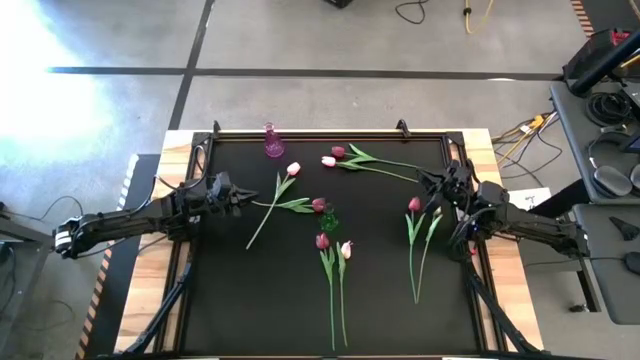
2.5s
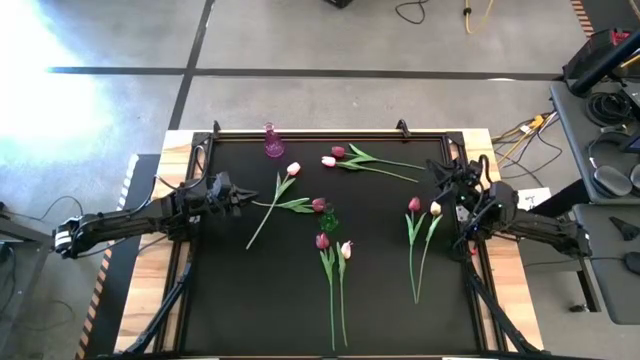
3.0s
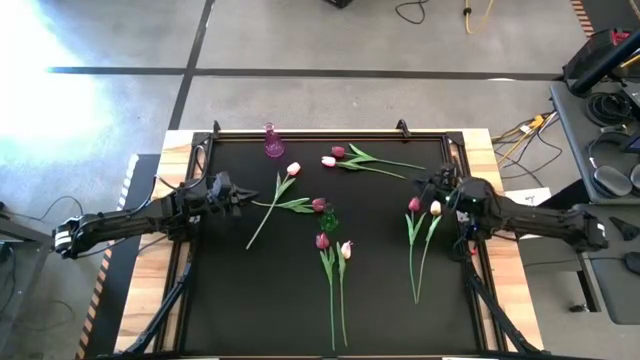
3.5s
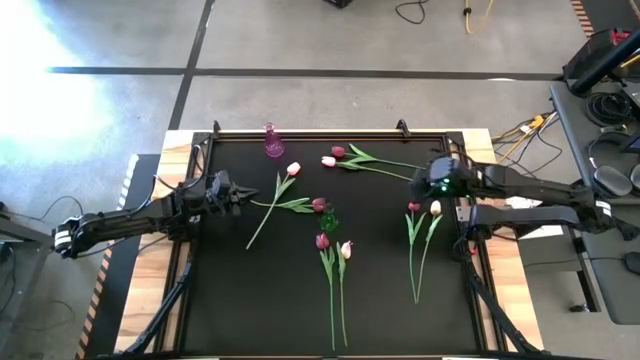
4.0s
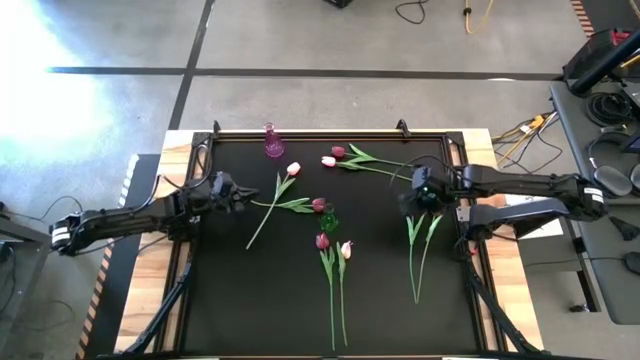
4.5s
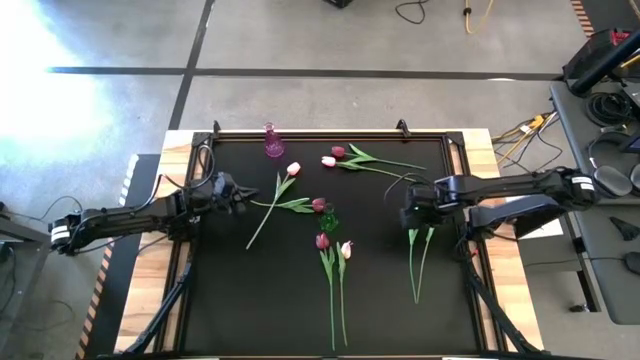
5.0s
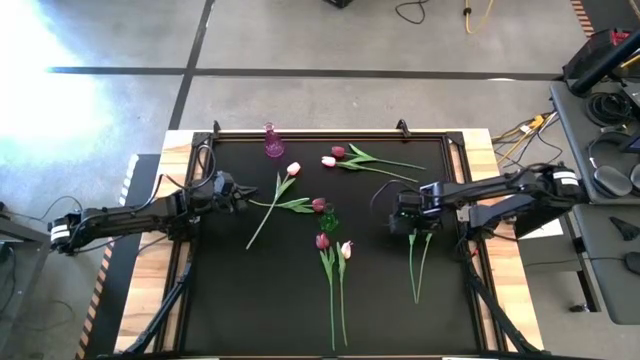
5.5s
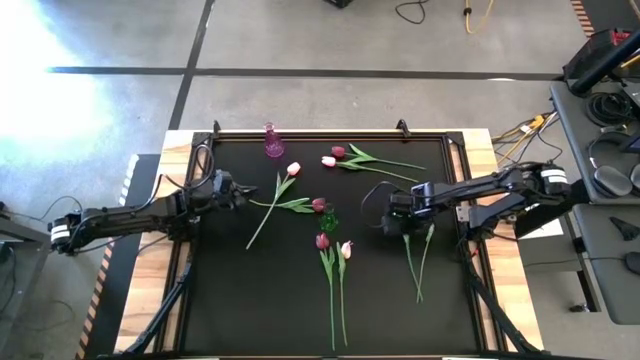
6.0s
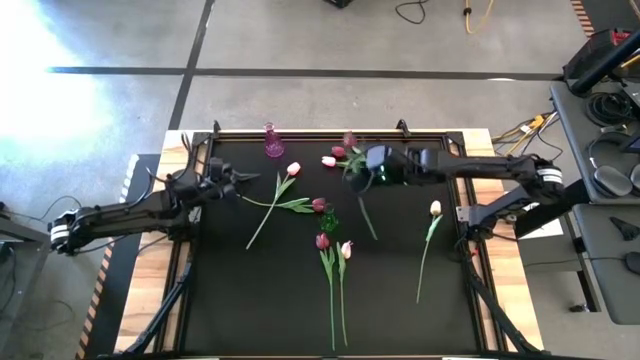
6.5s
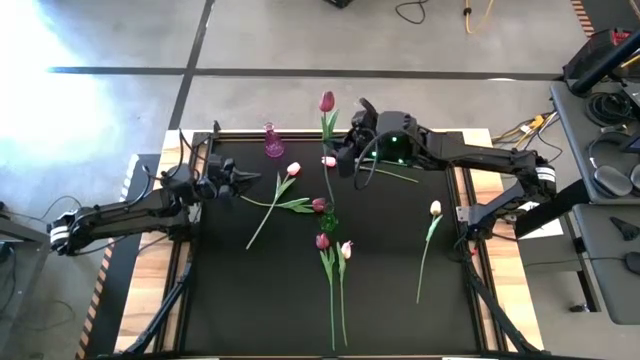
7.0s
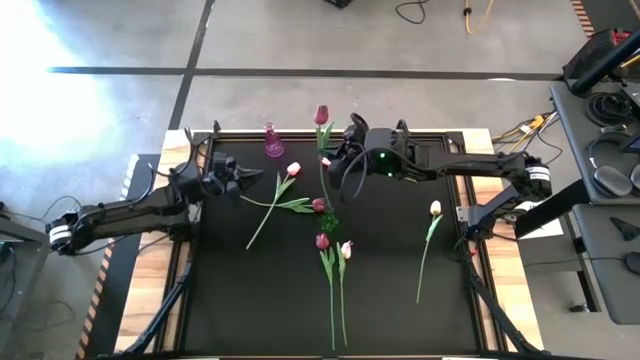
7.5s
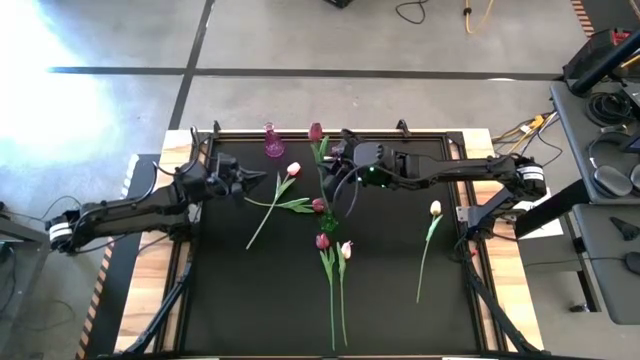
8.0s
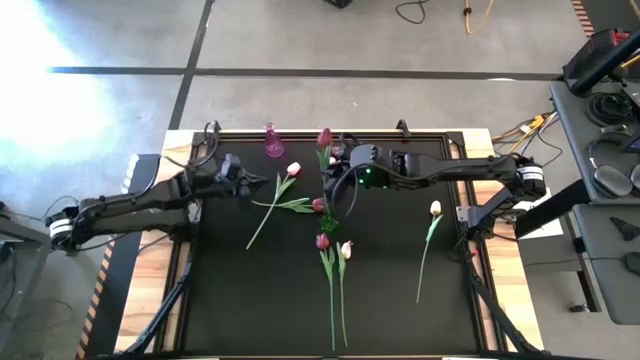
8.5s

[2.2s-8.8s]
Task: Sort flowers into vase by color
Put the red flower into the green vase

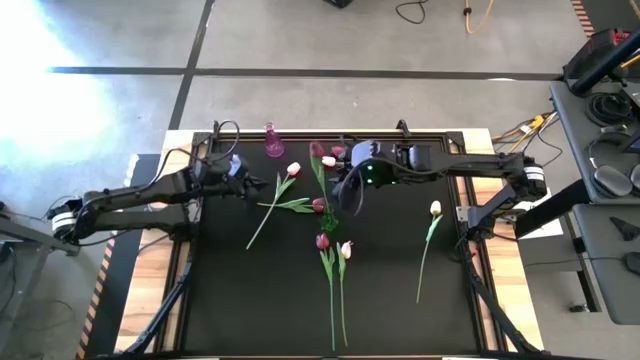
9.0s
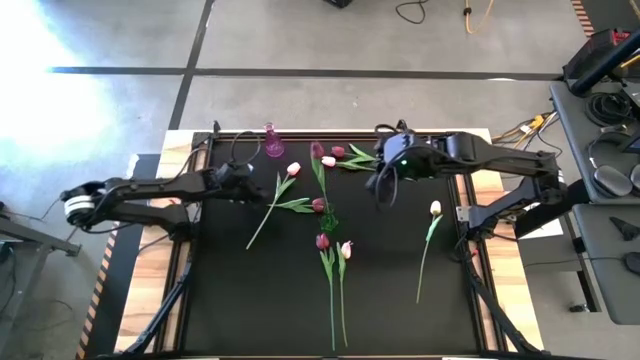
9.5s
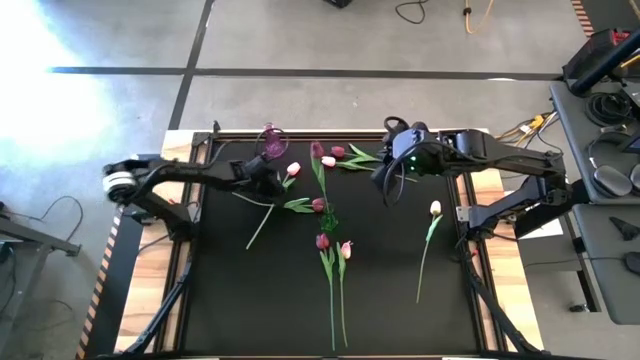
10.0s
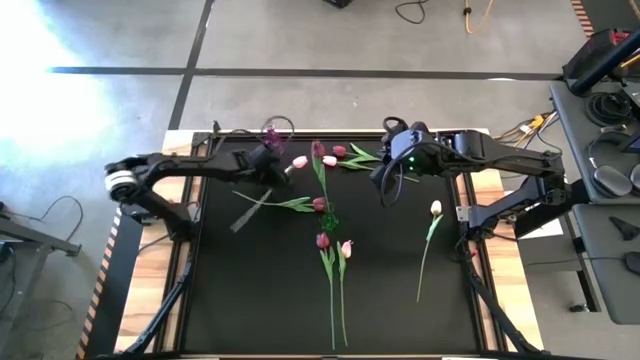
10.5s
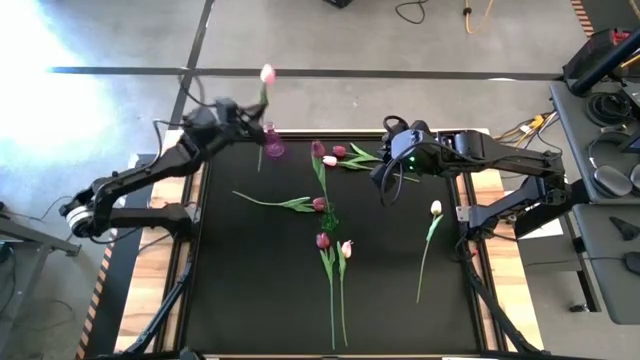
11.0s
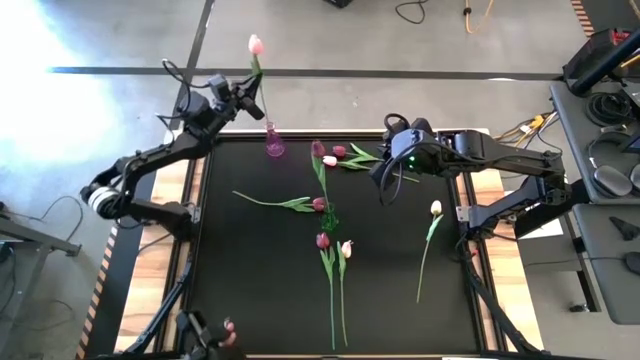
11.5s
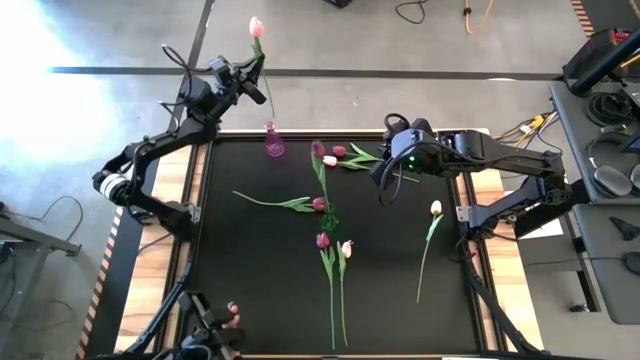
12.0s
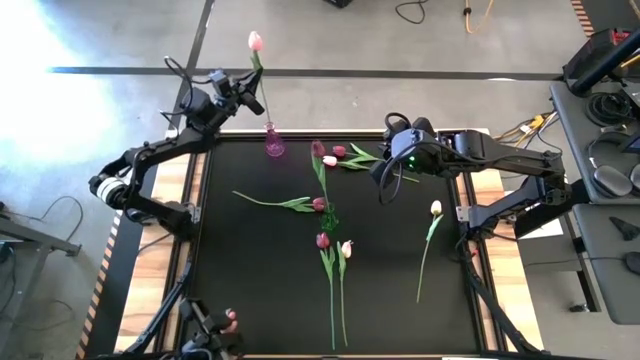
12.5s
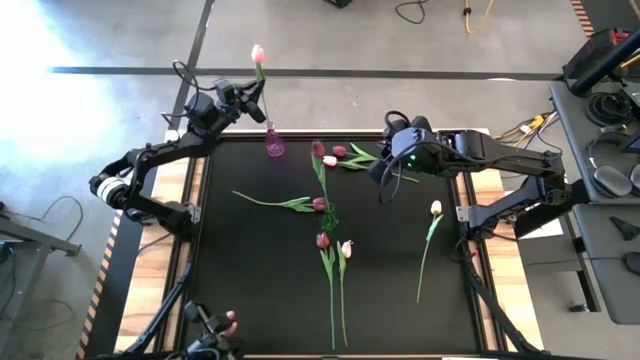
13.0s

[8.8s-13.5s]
Put the pink flower into the violet vase

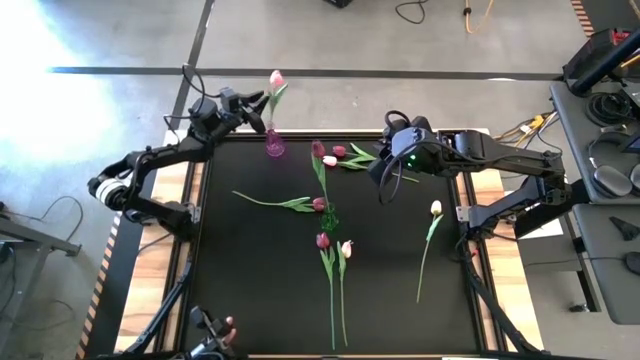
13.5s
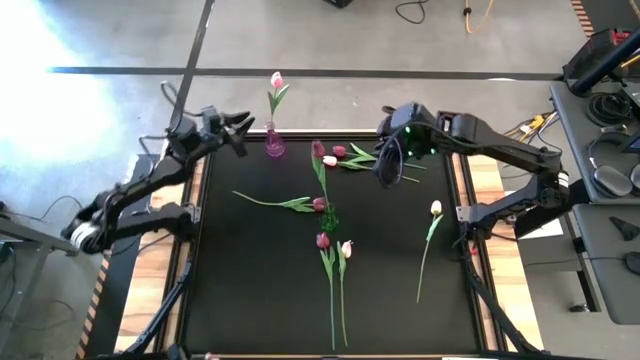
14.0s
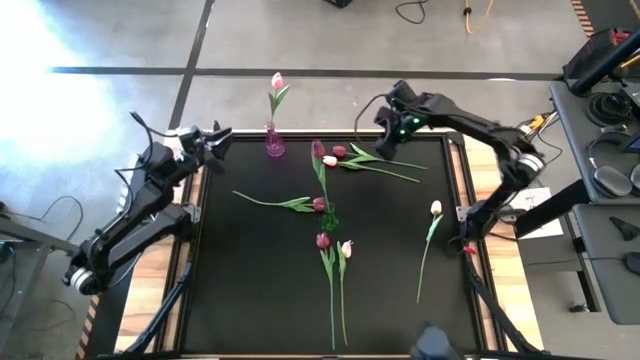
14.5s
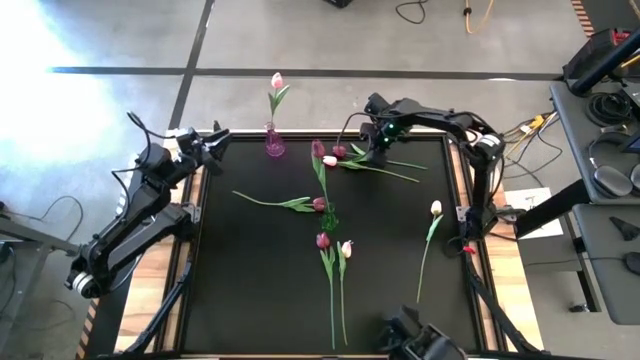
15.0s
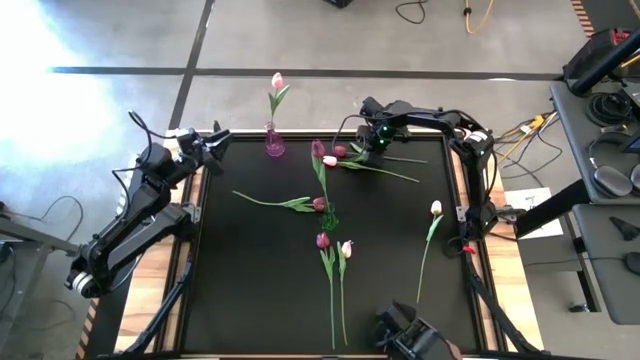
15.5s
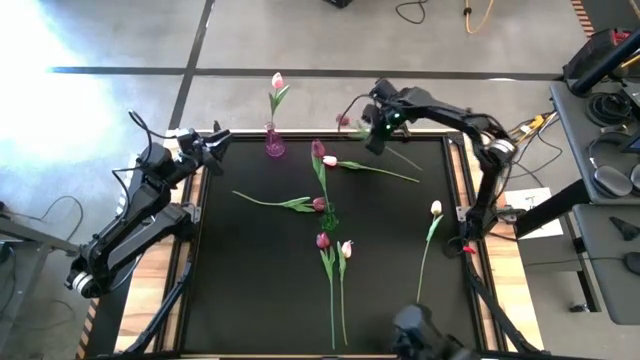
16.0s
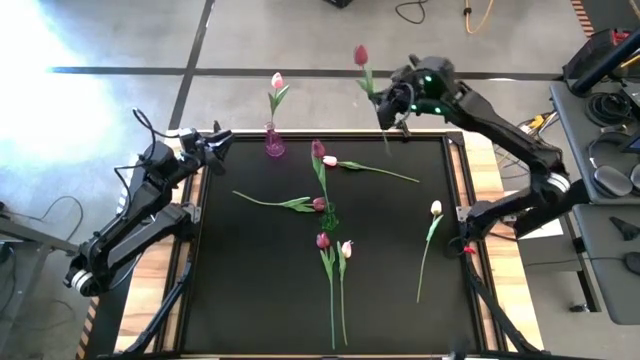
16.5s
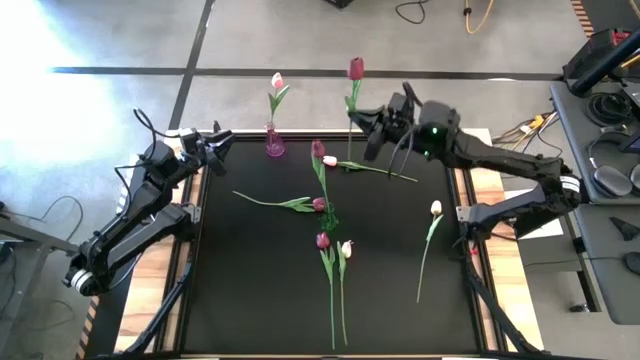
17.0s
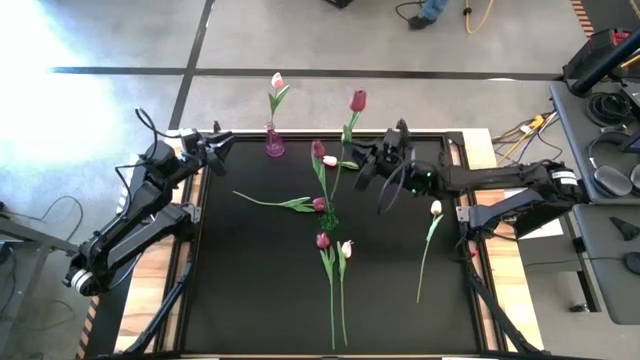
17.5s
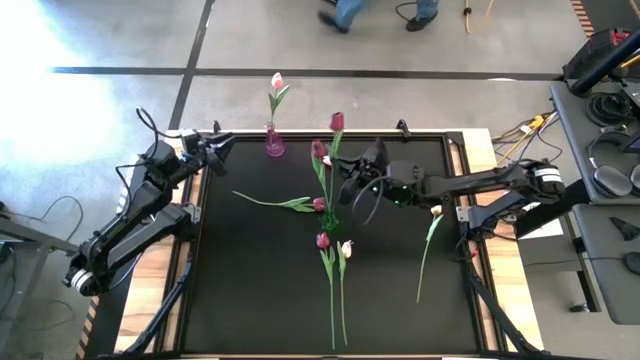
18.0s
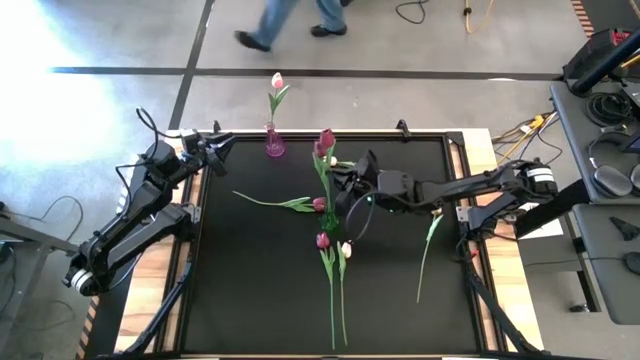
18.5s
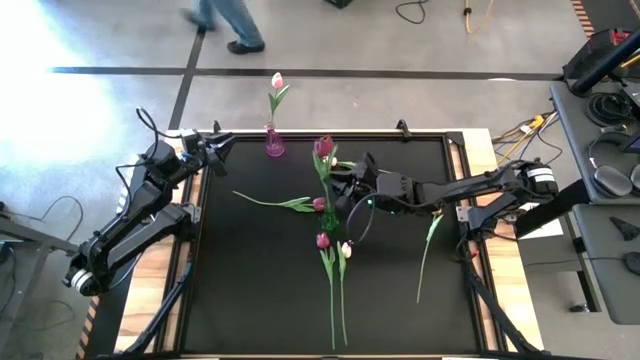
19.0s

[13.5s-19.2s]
Put the red flower into the green vase

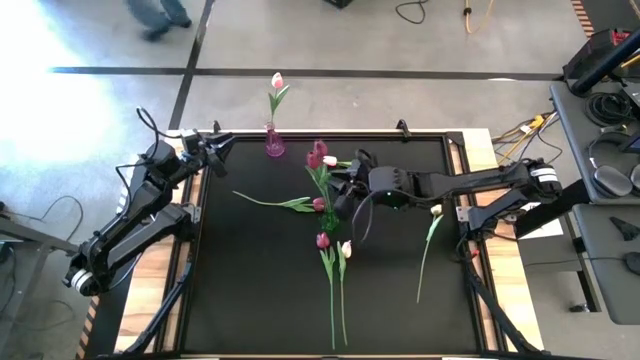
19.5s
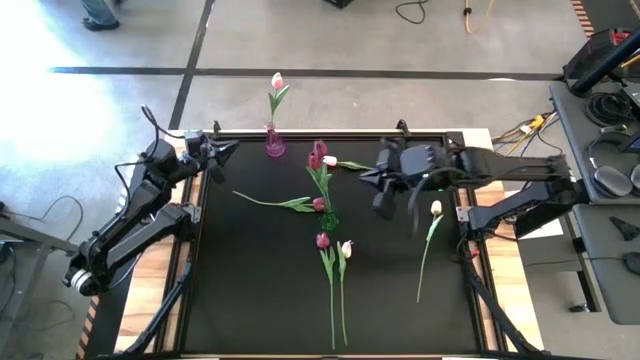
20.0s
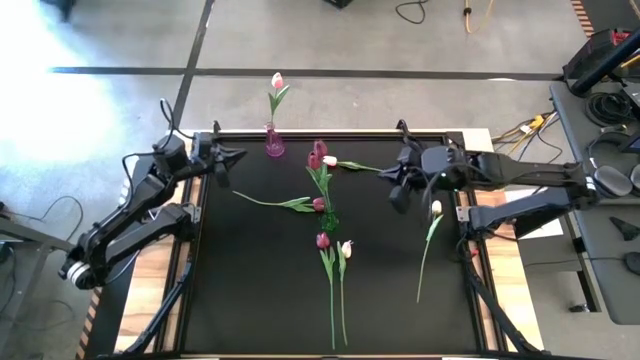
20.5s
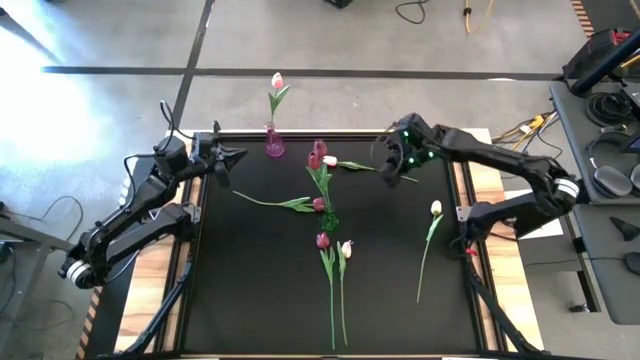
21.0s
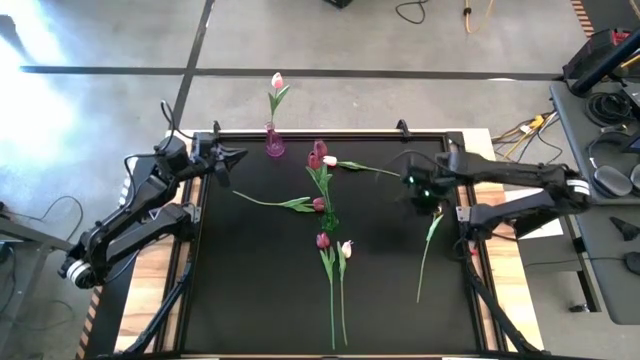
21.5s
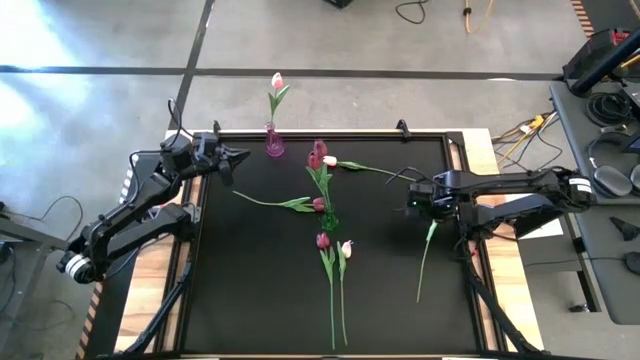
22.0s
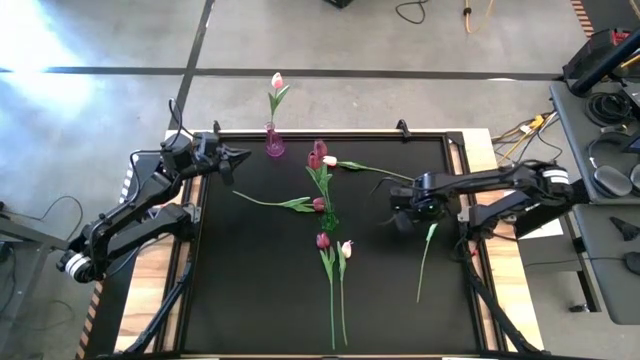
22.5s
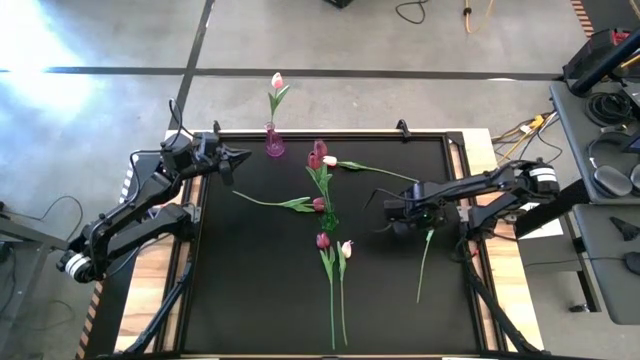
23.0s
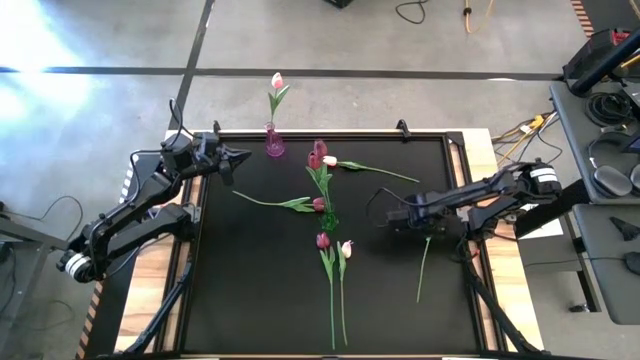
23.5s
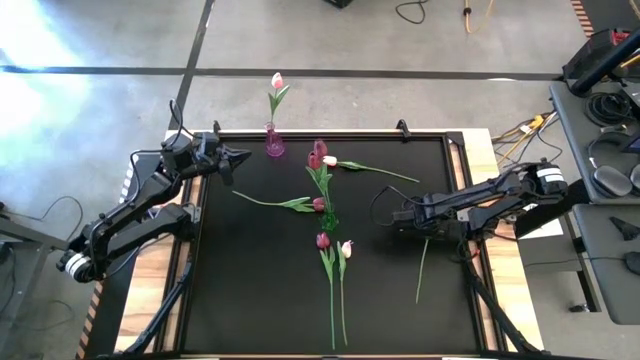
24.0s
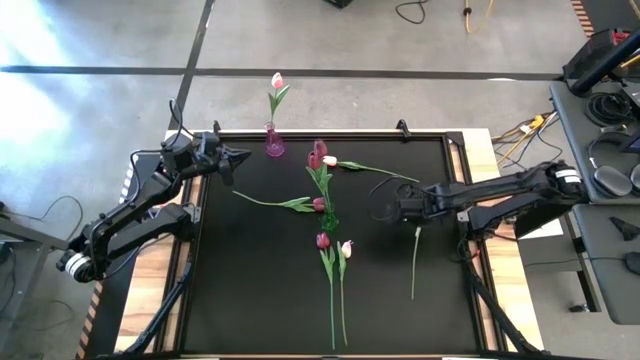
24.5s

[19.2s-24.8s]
Put the pink flower into the violet vase
